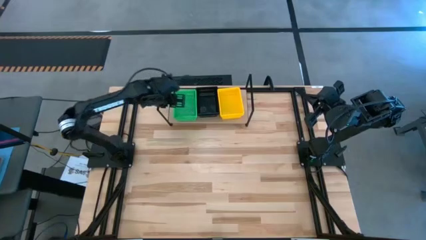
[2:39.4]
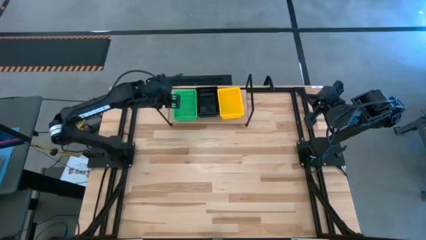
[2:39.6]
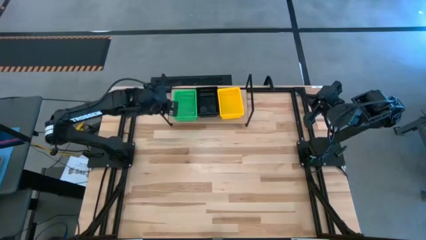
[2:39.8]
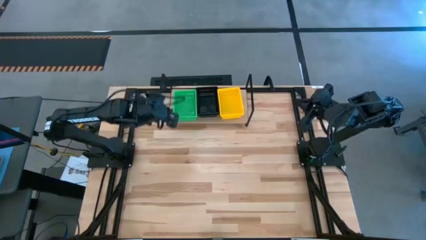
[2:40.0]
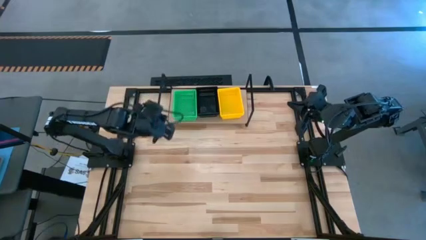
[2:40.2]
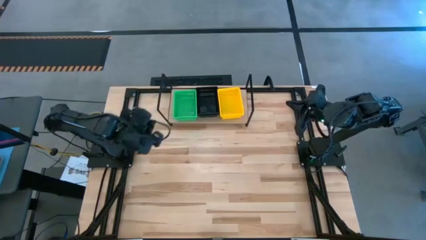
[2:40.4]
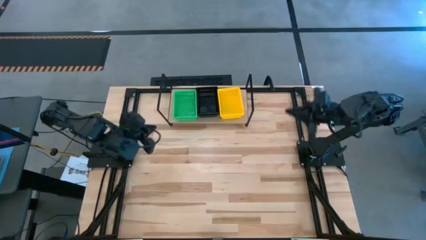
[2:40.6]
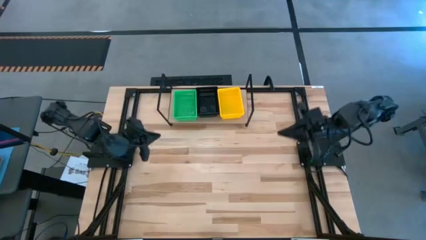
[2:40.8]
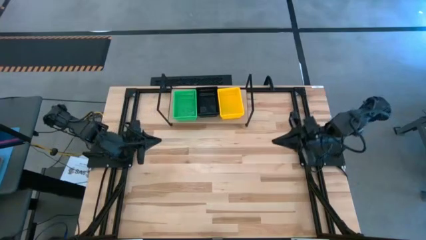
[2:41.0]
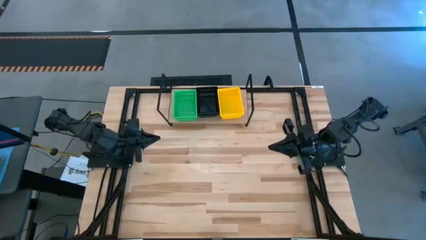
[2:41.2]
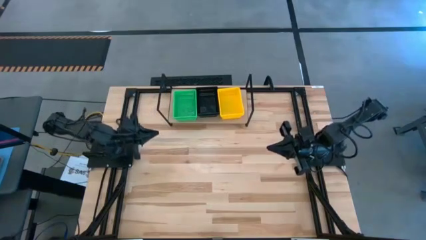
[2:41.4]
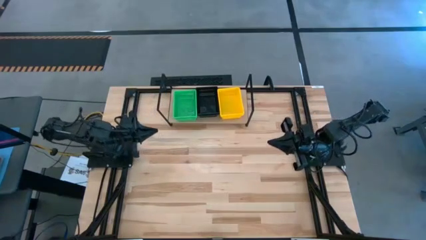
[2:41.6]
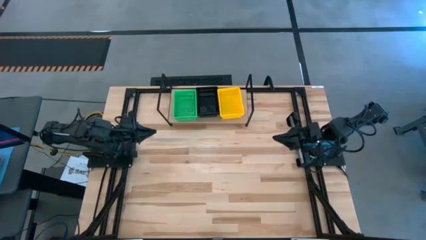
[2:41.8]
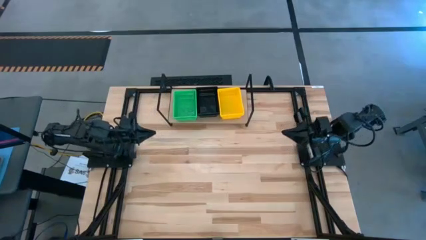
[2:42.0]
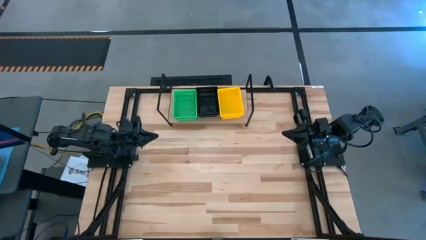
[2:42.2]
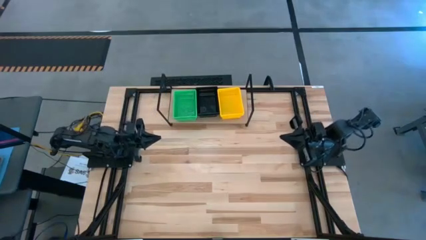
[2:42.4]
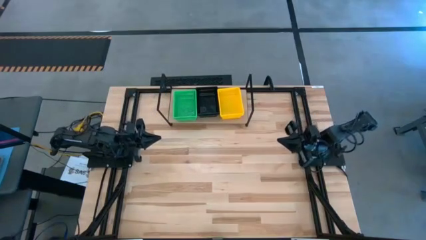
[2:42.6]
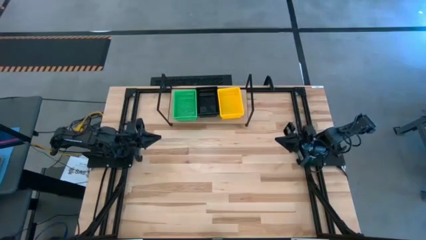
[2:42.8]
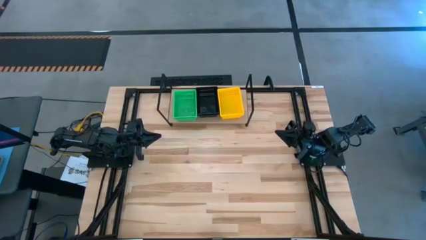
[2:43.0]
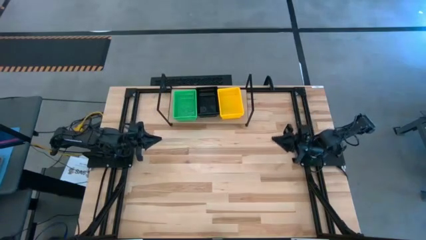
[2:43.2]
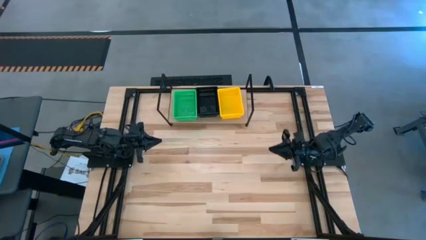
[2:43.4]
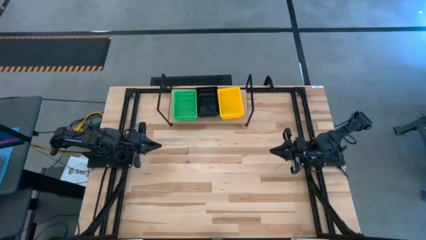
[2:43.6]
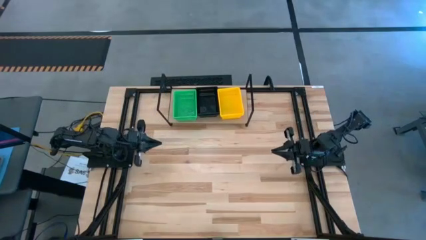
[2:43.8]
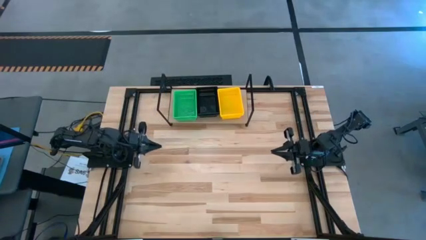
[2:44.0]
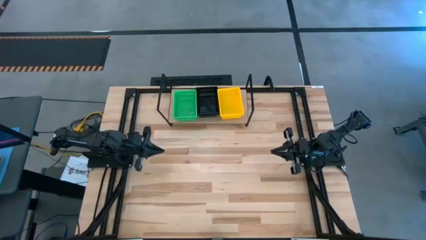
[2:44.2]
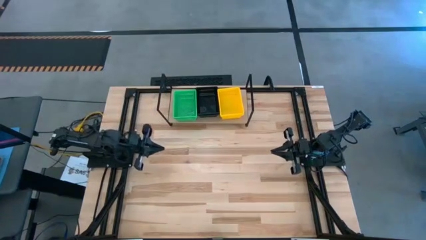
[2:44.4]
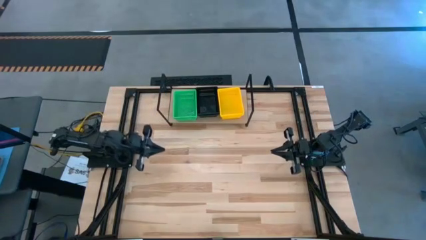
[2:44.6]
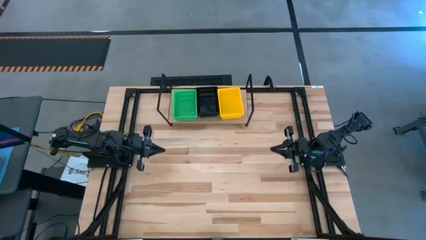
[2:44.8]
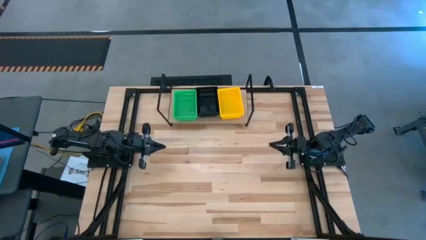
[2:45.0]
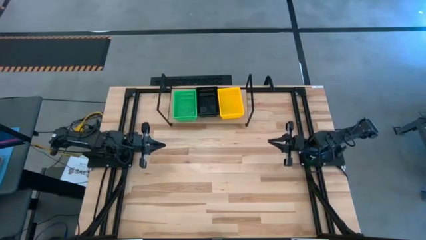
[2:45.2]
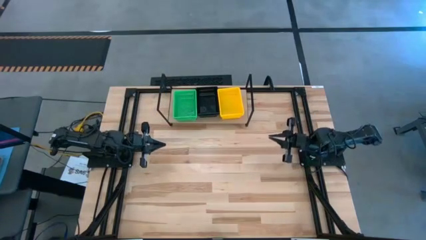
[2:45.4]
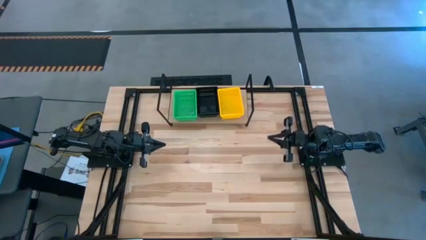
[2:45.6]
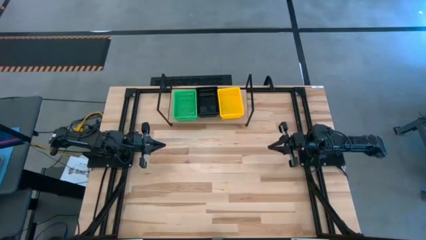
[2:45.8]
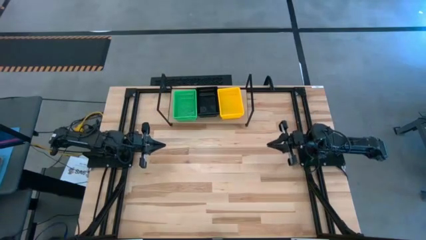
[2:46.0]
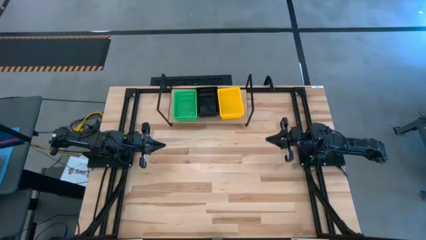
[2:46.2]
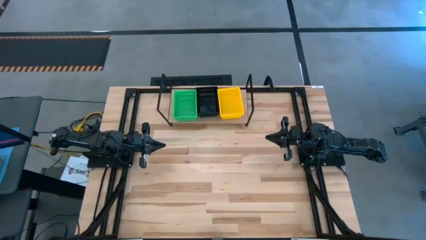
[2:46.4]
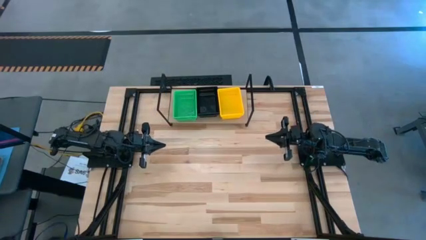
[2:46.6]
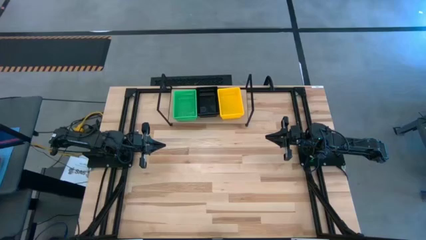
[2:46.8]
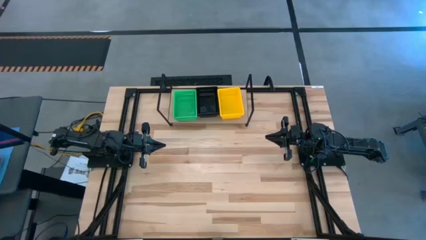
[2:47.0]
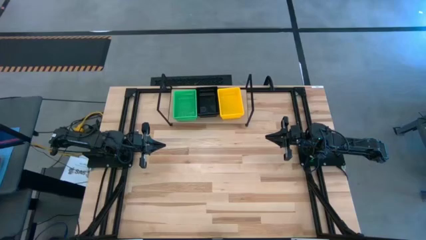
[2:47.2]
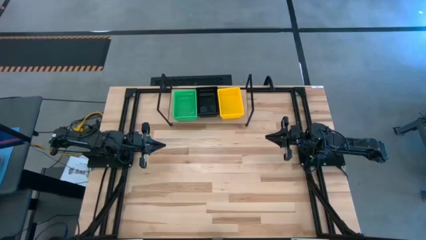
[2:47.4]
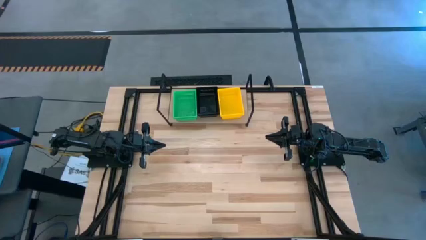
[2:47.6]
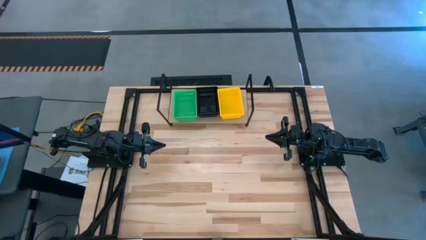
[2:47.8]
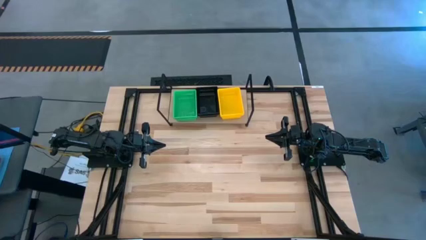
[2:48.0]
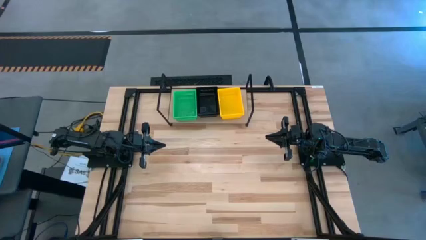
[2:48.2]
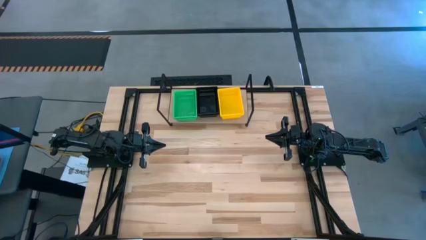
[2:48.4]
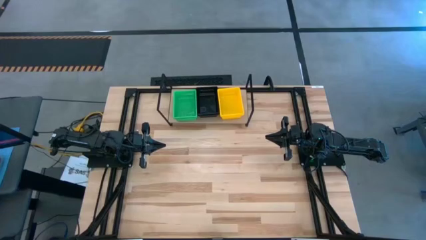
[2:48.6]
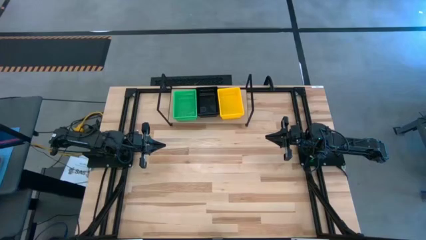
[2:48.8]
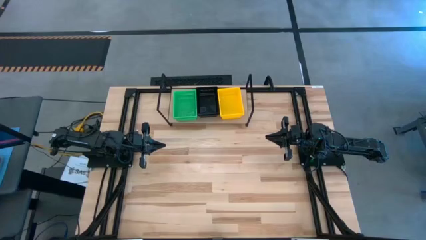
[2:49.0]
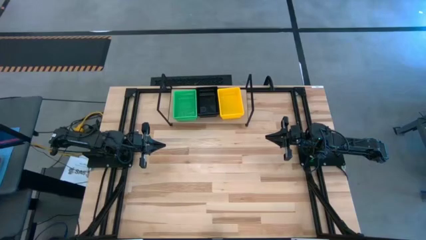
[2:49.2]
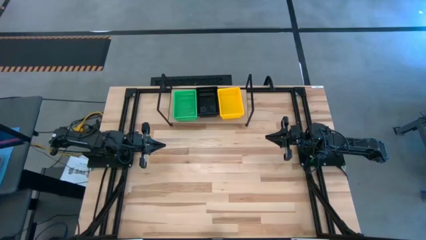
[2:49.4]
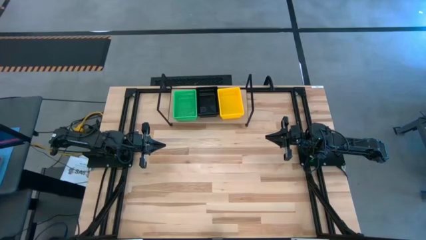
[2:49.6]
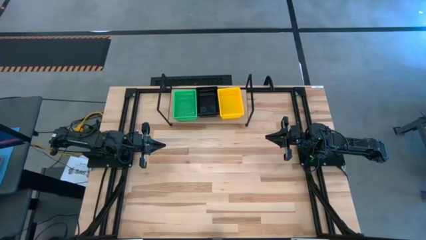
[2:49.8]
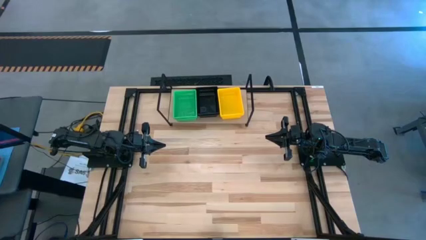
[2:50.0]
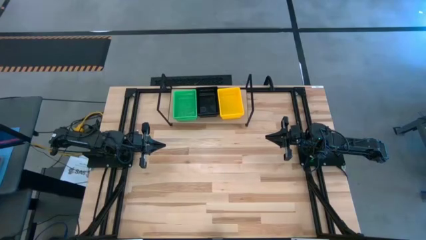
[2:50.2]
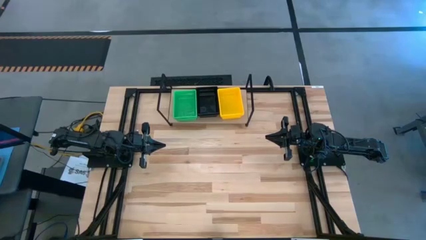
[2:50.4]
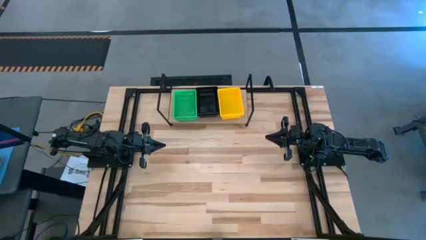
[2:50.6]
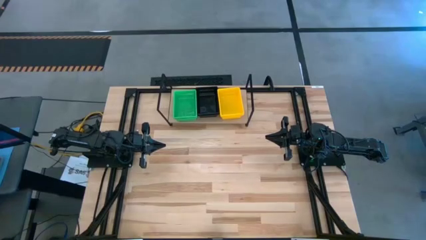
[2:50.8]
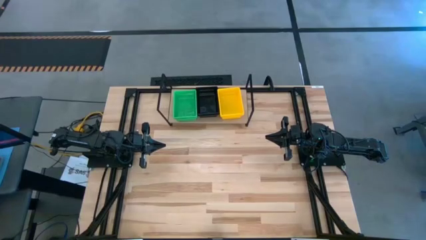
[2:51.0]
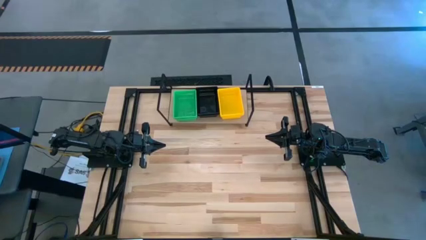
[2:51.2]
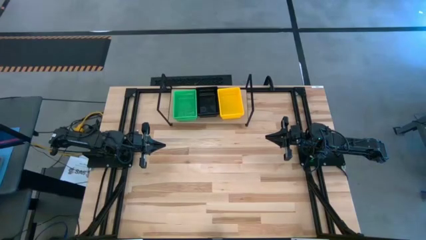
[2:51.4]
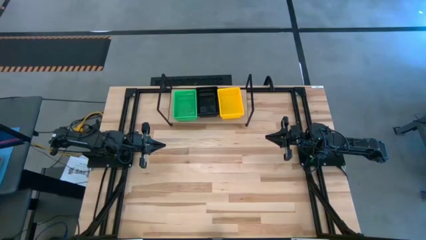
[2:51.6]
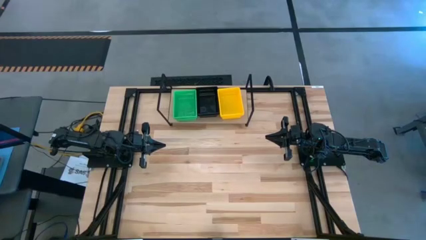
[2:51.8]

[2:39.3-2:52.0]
Task: Stack baskets on shelf by color
Return to Home Position
